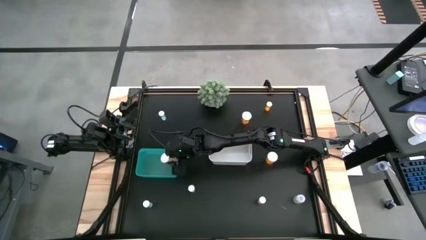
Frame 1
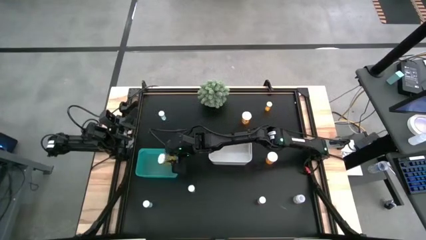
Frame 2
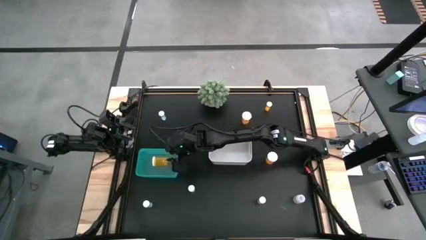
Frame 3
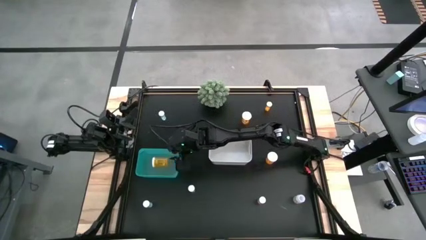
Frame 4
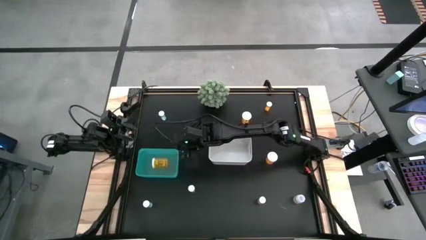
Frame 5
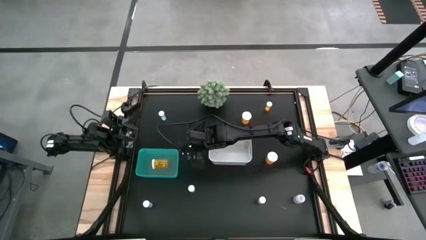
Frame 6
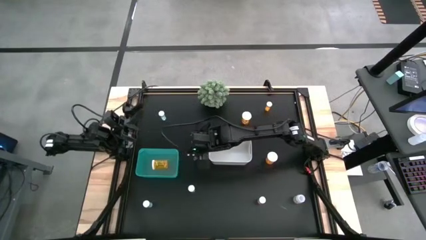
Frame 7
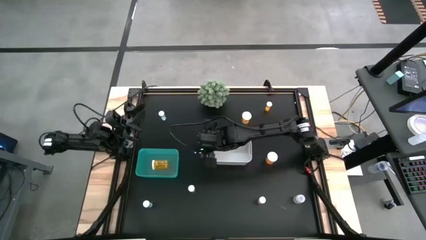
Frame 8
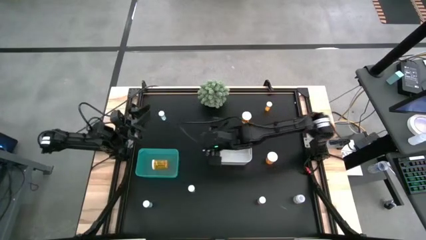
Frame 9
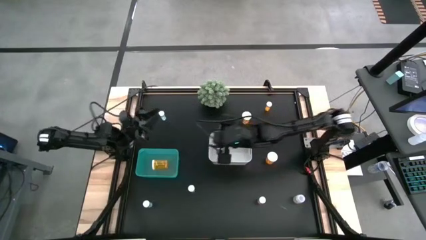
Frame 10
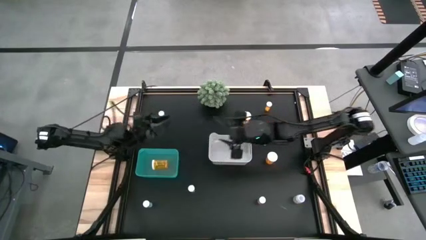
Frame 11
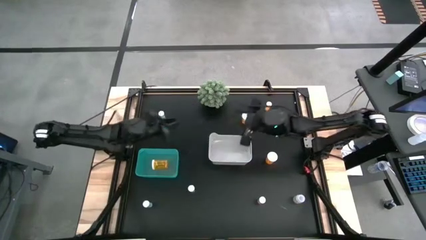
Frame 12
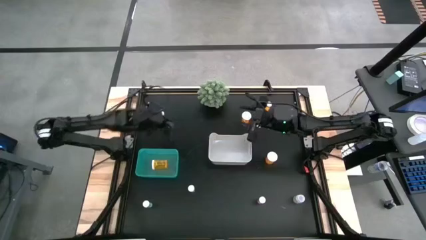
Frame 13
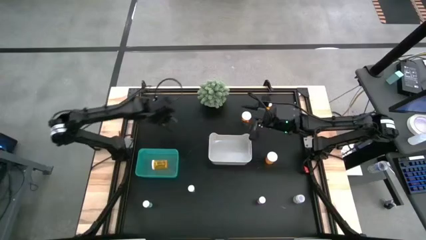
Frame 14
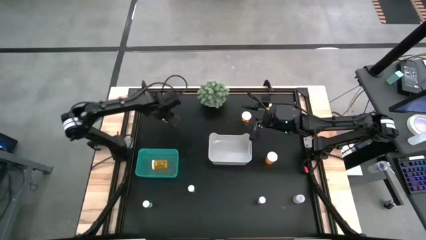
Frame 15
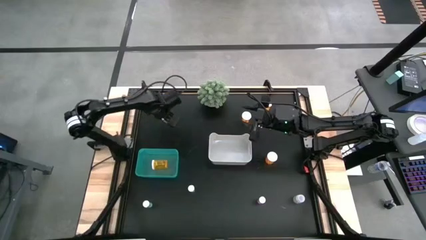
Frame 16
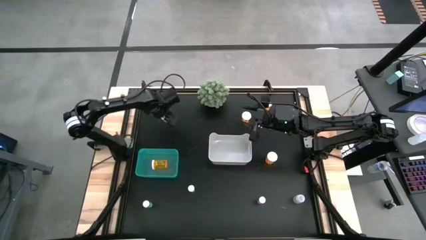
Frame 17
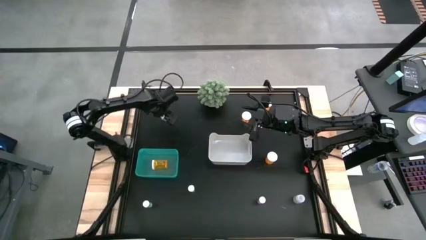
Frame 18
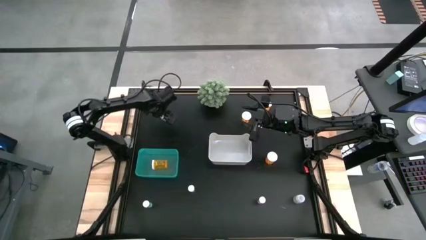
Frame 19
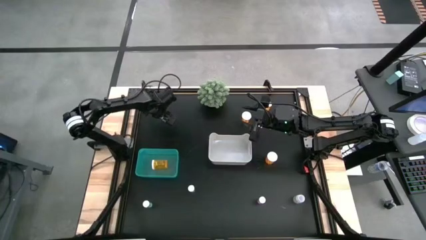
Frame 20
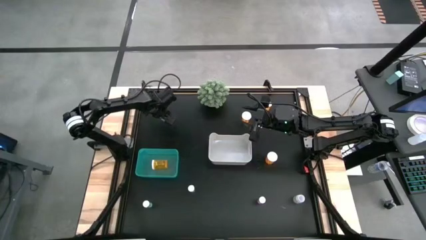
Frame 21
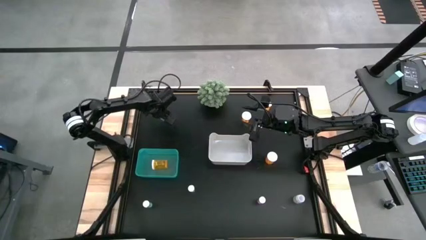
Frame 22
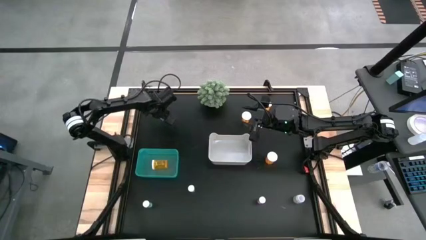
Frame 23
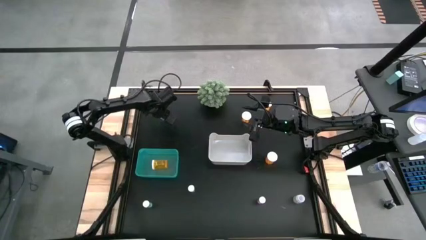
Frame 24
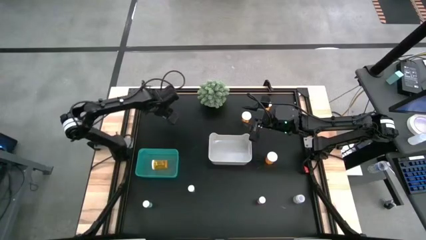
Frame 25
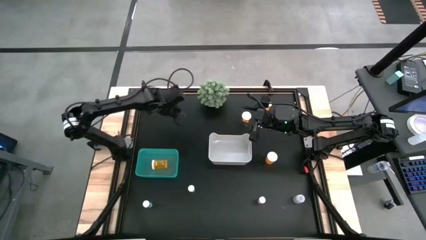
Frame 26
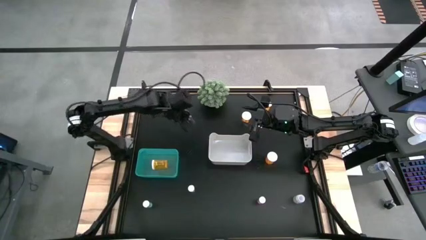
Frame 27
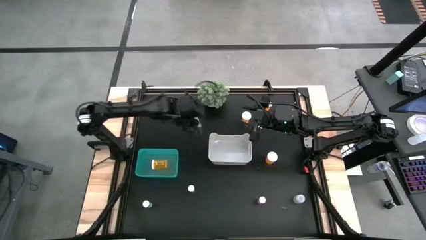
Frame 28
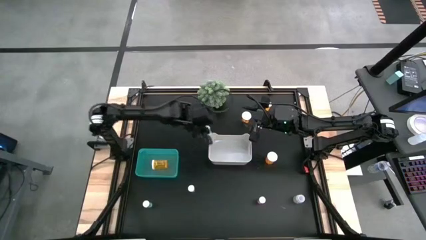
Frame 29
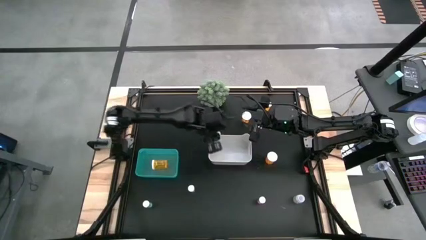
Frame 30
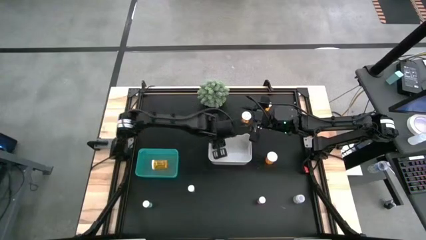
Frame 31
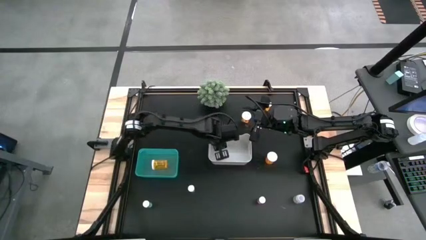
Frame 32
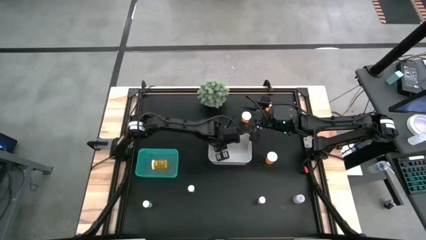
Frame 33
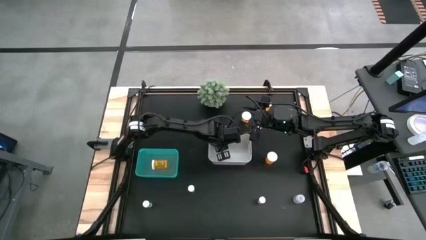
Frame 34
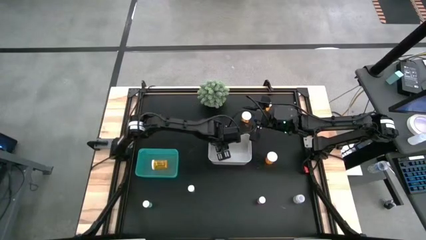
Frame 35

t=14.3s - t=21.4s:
Task: Pick and place medicine bottles into bin by pill shape (circle, oval)
Put the blue tablet bottle into the white bin

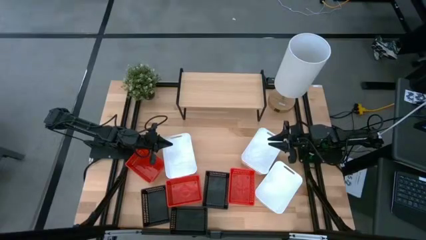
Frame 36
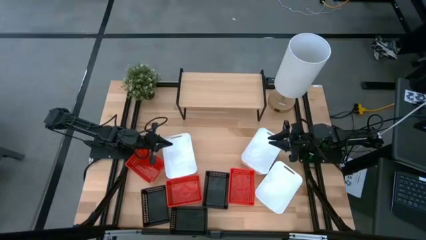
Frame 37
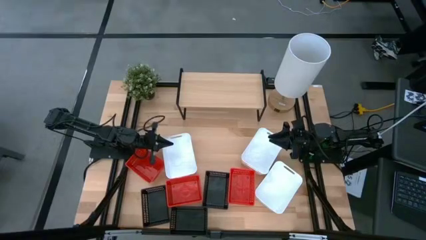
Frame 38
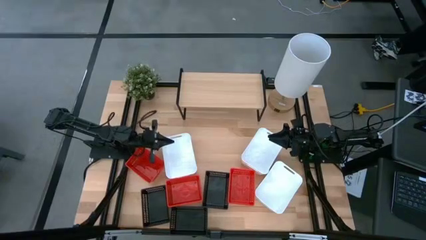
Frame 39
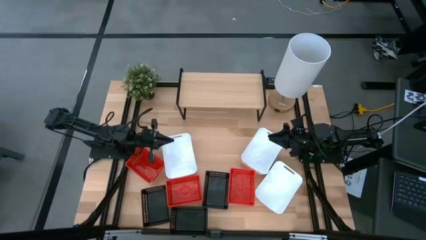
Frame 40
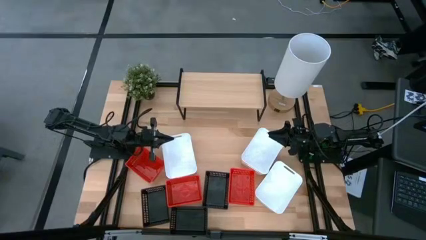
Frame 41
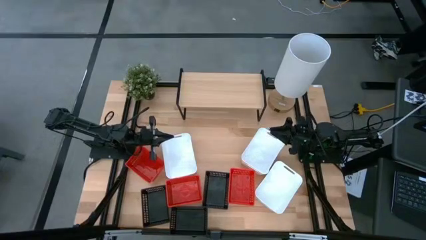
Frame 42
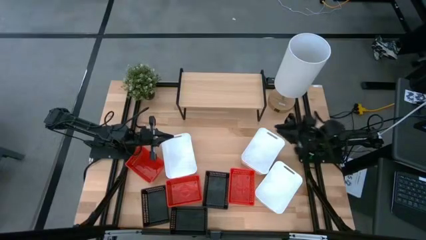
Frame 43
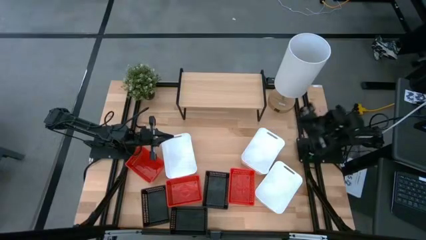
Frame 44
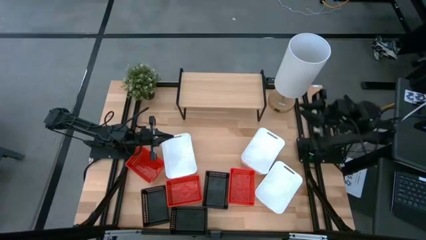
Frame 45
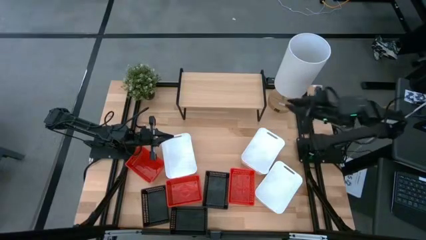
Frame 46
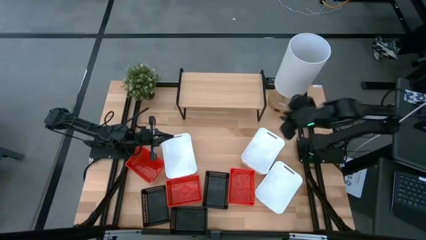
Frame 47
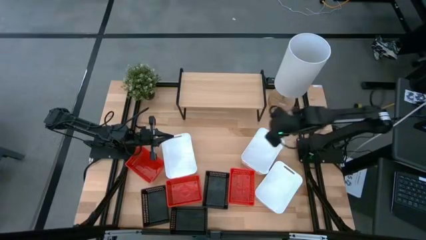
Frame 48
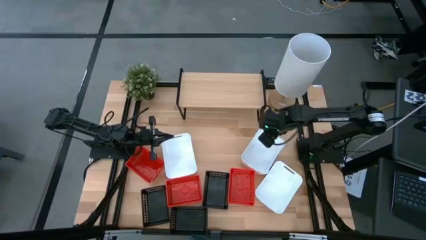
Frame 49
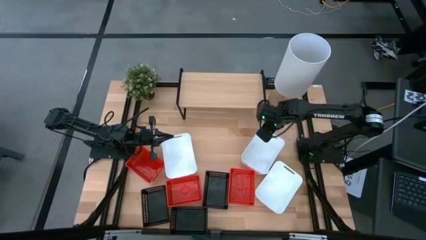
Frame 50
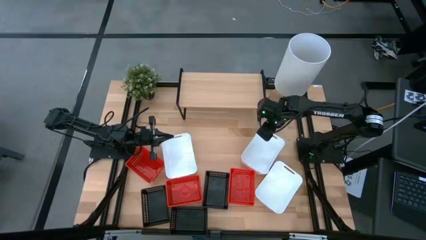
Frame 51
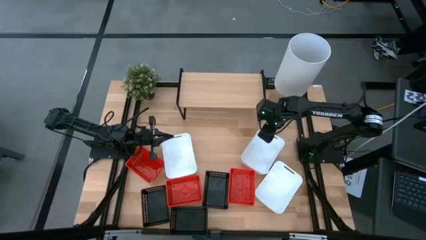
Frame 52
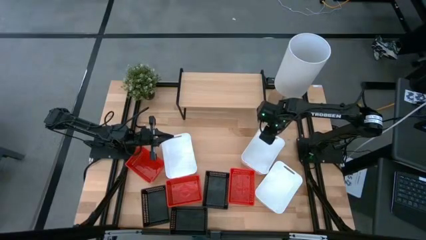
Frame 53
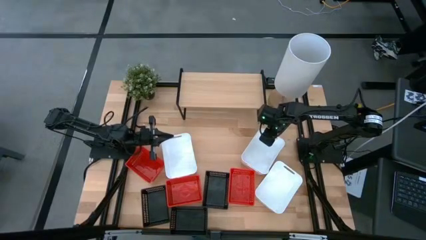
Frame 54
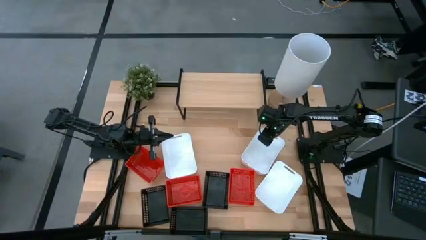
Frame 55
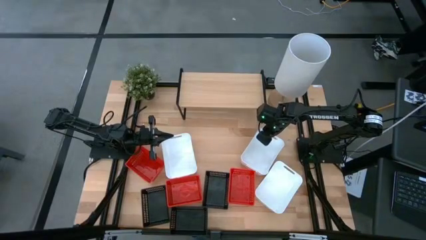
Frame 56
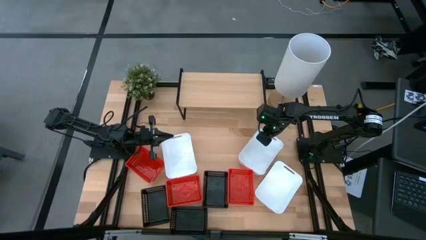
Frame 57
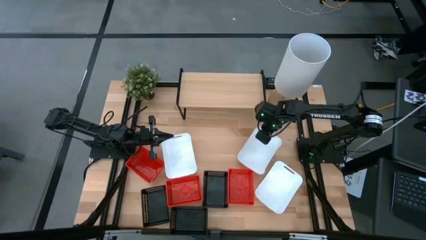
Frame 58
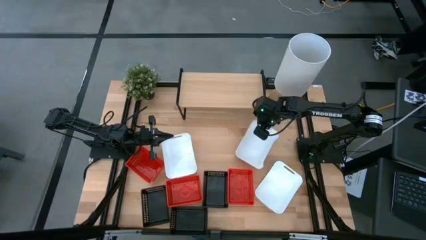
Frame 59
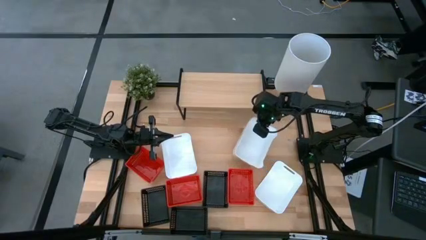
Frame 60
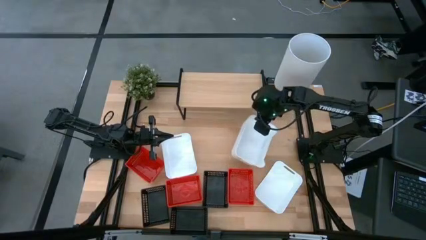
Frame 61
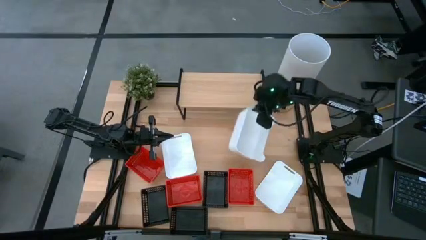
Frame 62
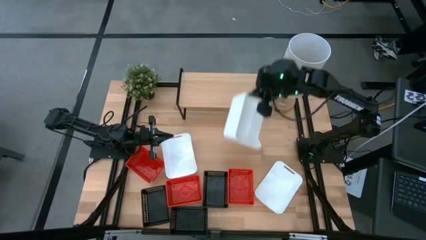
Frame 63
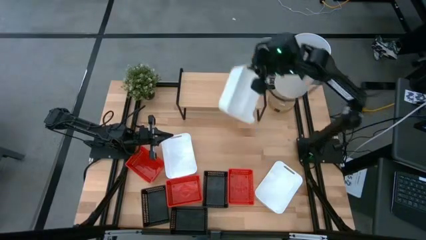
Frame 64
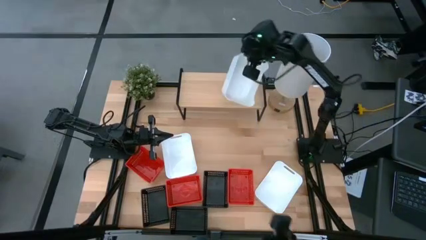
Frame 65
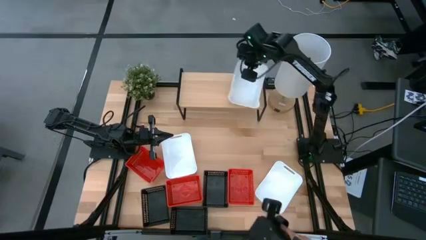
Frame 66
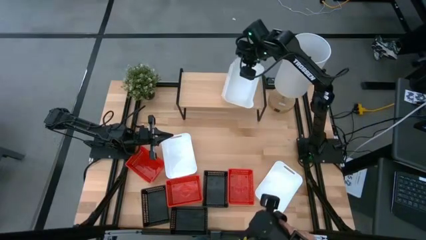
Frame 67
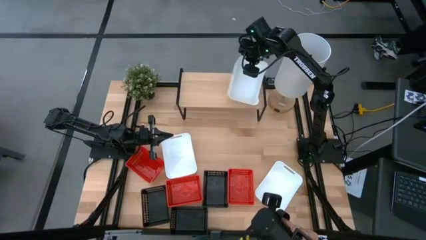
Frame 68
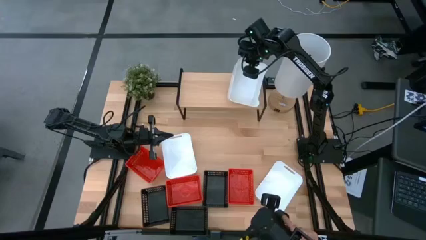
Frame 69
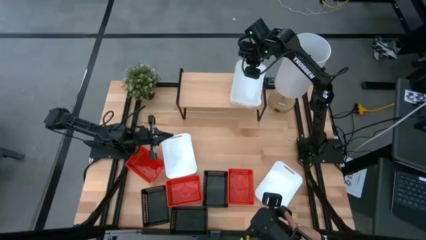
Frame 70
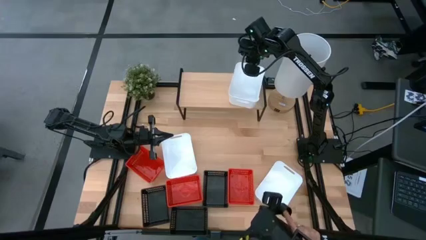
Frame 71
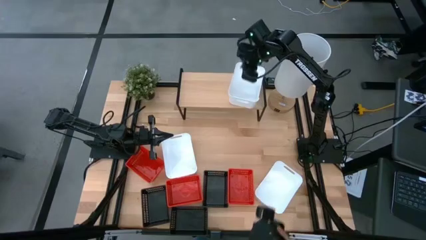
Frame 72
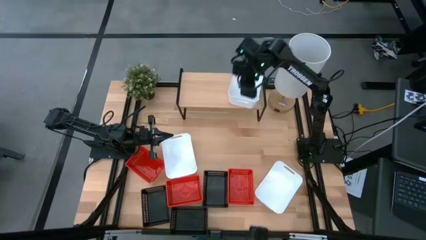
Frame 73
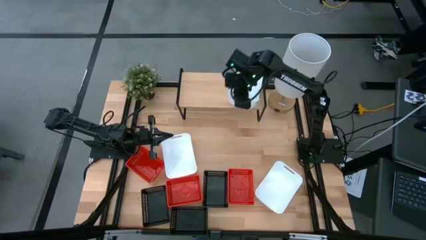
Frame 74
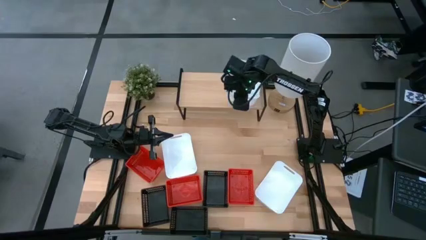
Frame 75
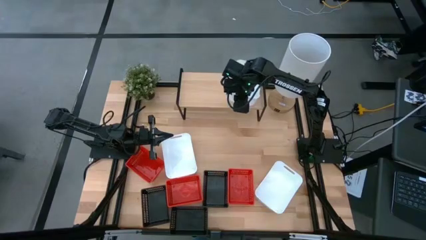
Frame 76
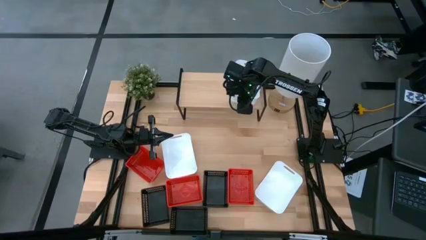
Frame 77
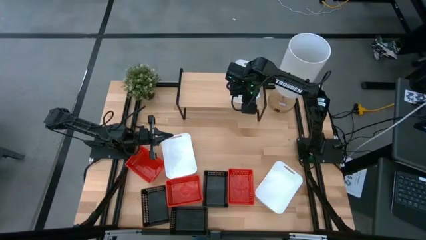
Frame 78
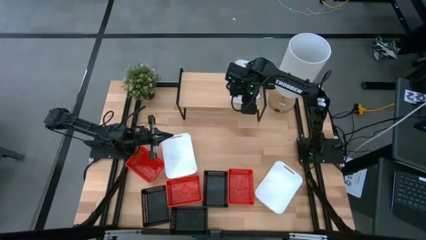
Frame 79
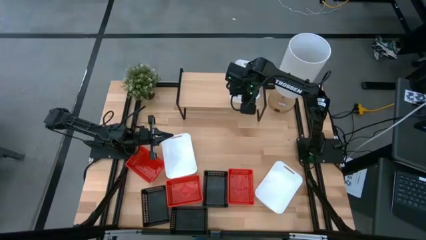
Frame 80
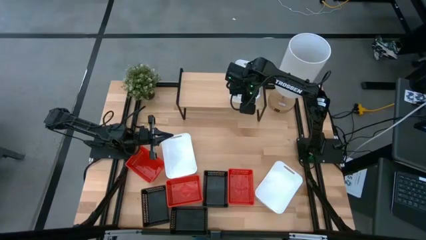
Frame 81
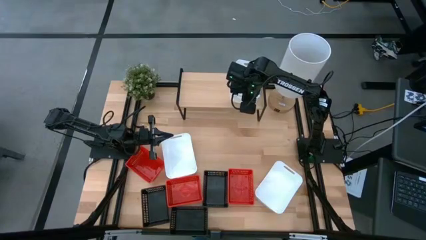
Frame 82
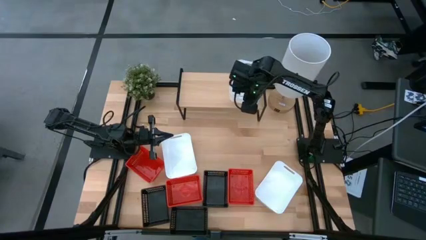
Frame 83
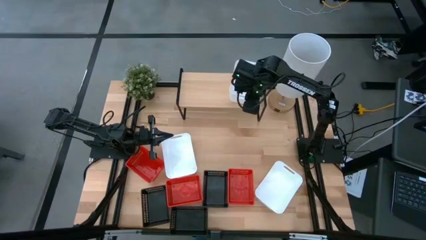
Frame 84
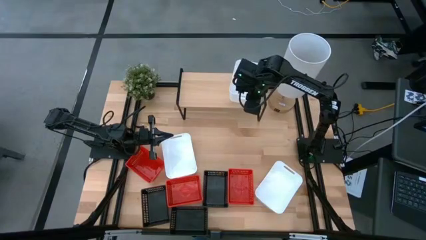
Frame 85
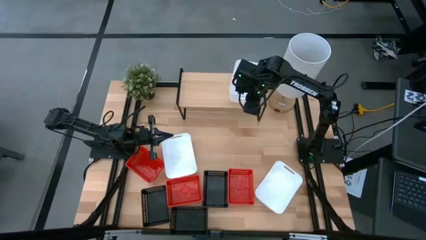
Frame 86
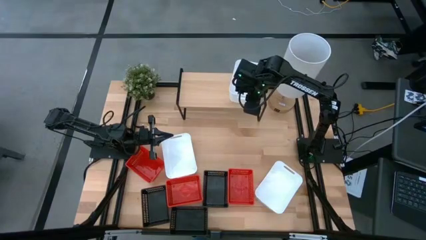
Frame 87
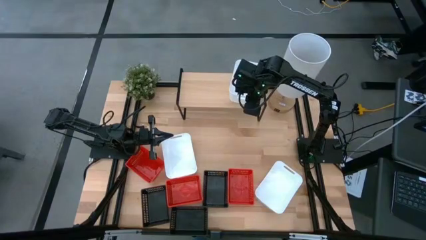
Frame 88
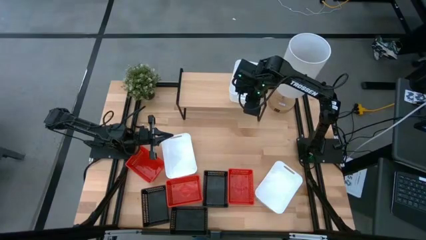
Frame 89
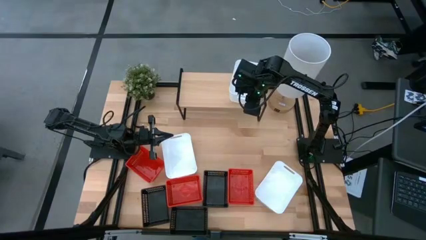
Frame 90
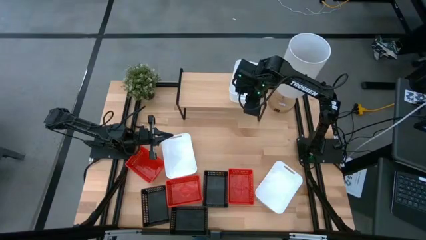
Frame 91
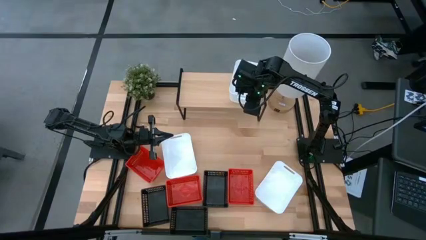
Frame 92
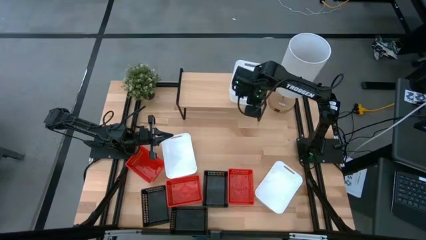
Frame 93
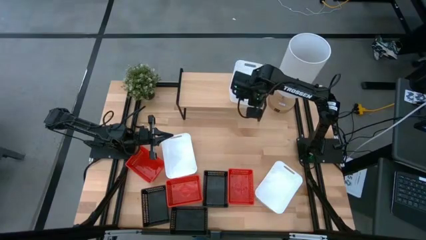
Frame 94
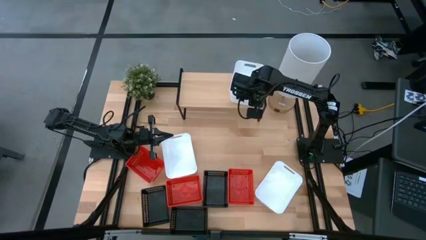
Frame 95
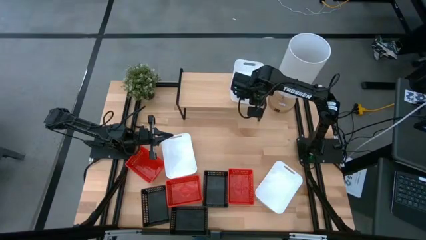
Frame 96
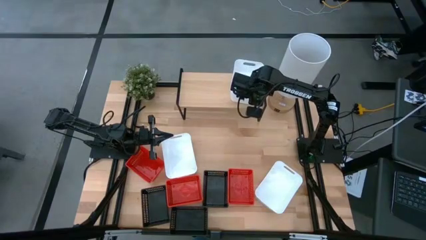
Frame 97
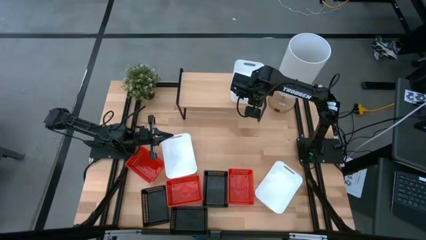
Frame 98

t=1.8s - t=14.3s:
Task: Stack baskets on shelf by color
Put the top right white bin on the shelf
